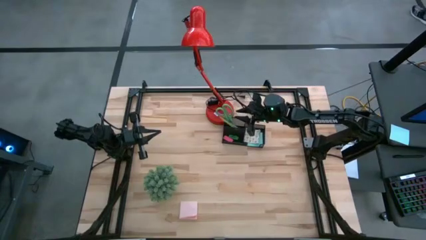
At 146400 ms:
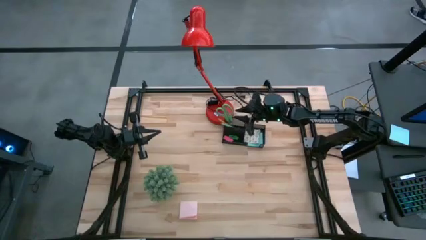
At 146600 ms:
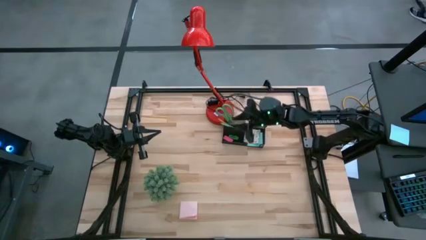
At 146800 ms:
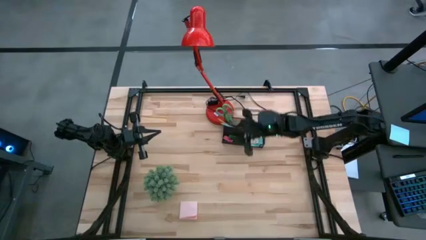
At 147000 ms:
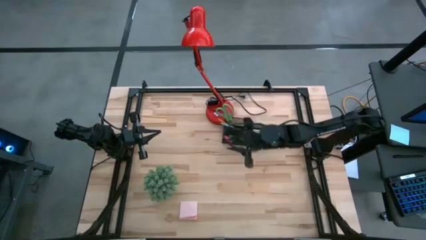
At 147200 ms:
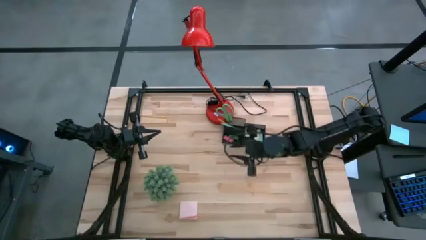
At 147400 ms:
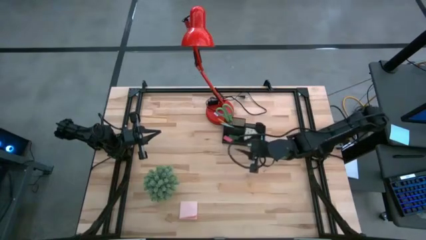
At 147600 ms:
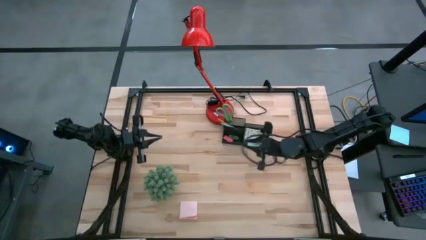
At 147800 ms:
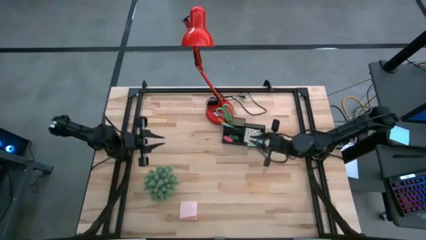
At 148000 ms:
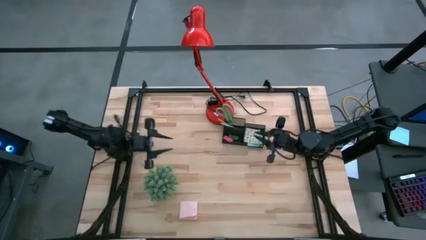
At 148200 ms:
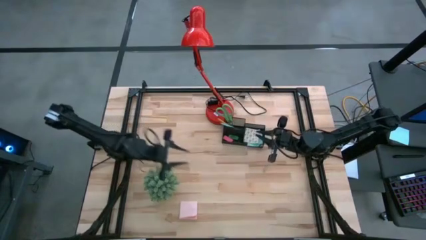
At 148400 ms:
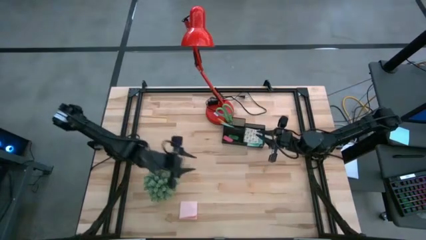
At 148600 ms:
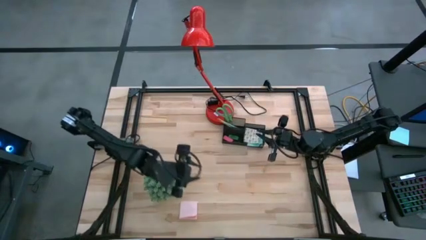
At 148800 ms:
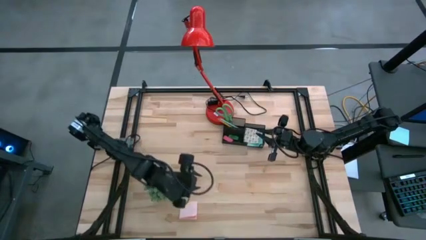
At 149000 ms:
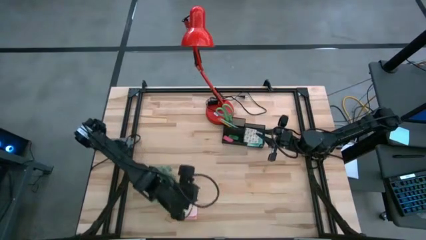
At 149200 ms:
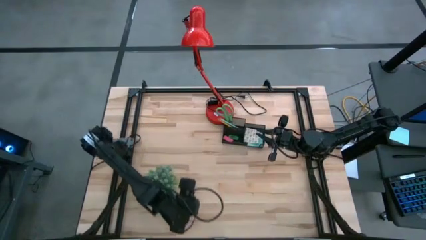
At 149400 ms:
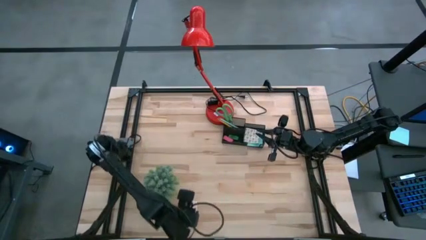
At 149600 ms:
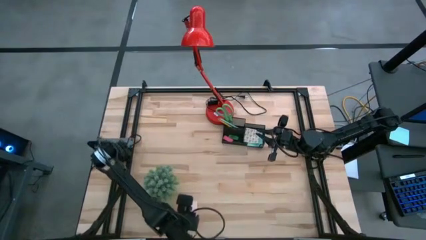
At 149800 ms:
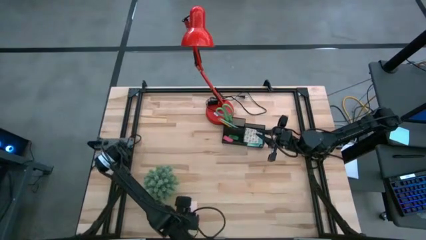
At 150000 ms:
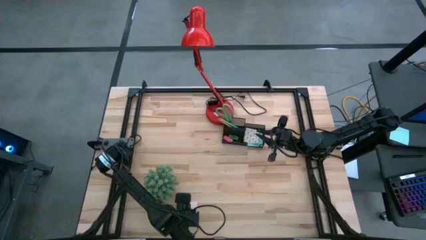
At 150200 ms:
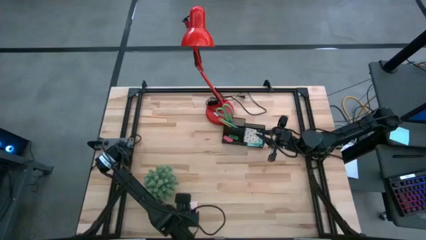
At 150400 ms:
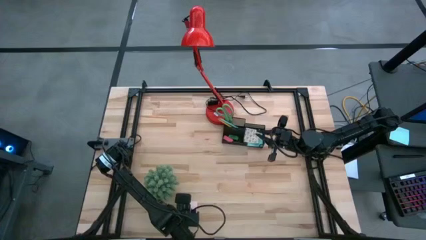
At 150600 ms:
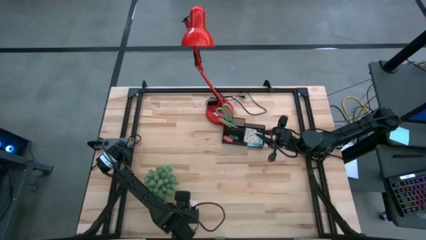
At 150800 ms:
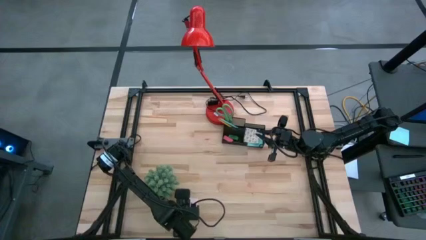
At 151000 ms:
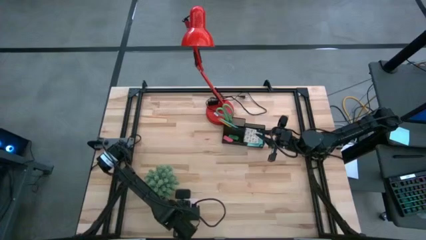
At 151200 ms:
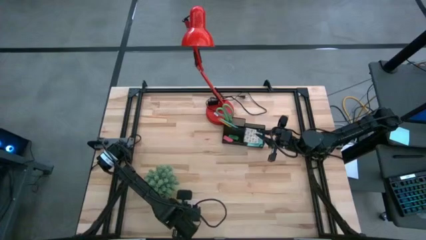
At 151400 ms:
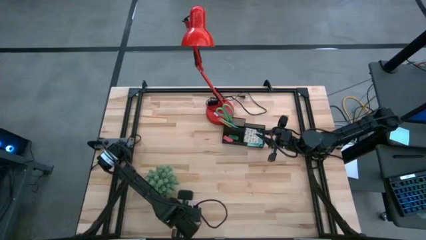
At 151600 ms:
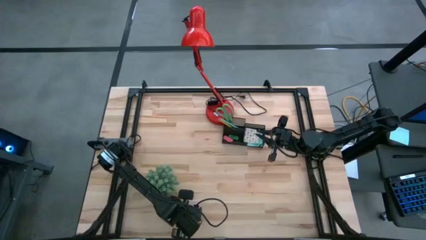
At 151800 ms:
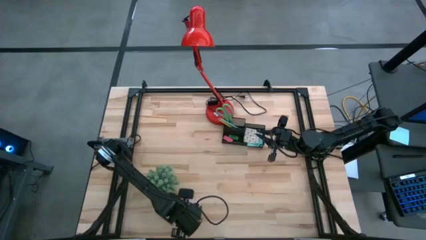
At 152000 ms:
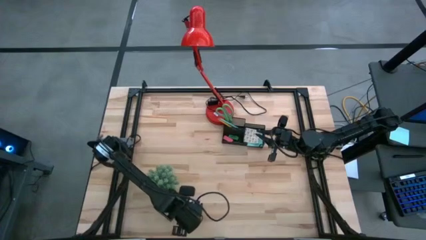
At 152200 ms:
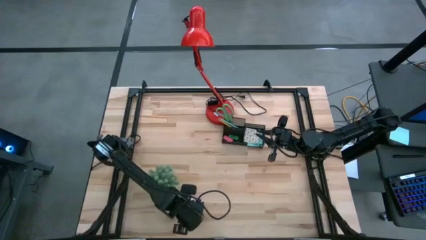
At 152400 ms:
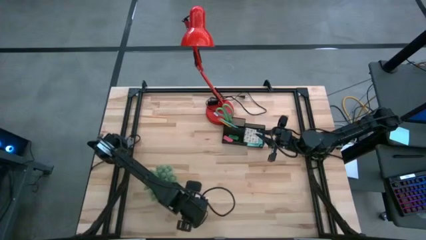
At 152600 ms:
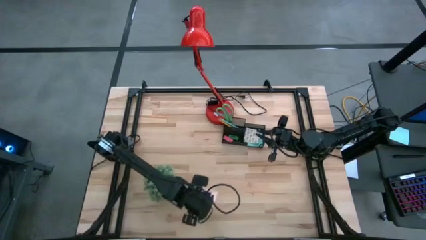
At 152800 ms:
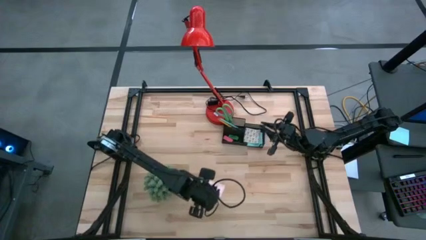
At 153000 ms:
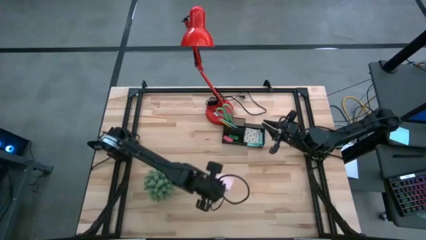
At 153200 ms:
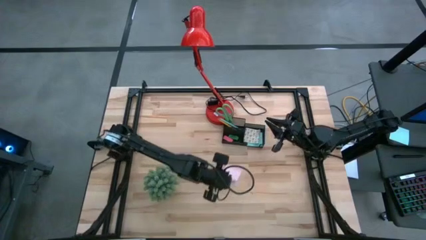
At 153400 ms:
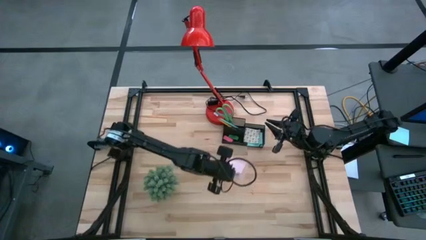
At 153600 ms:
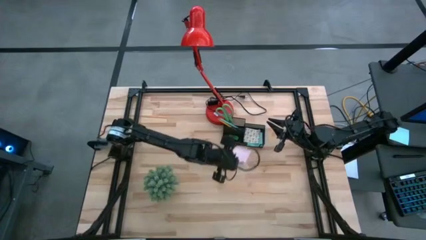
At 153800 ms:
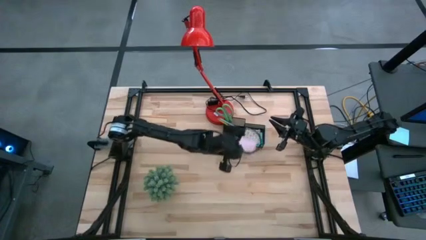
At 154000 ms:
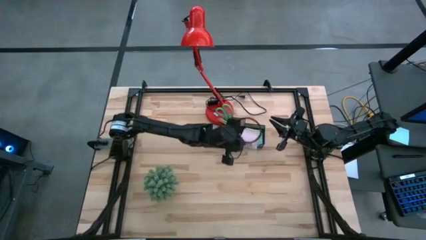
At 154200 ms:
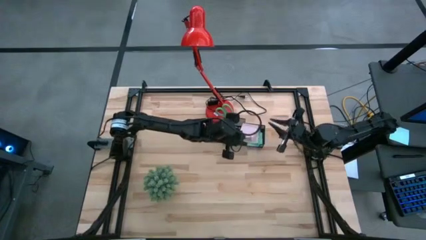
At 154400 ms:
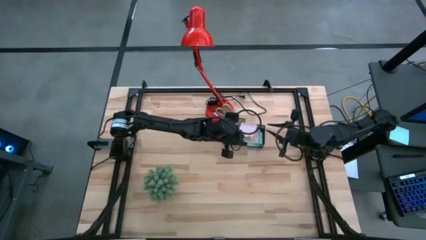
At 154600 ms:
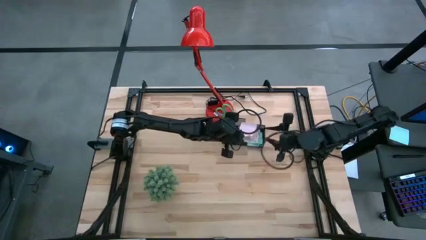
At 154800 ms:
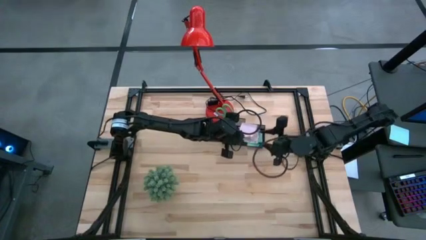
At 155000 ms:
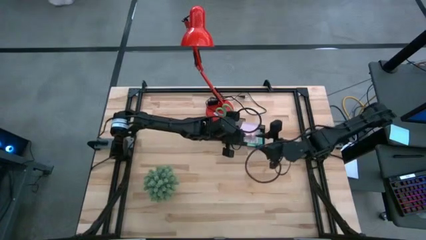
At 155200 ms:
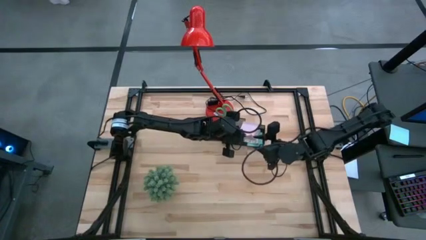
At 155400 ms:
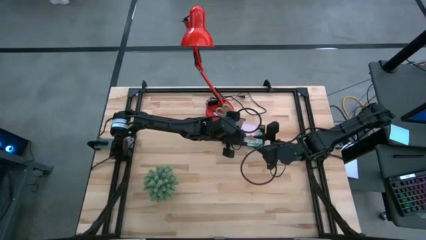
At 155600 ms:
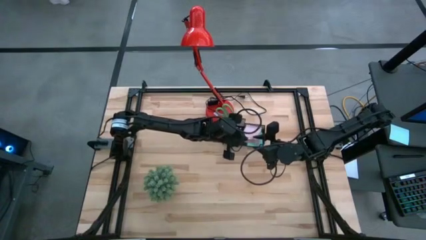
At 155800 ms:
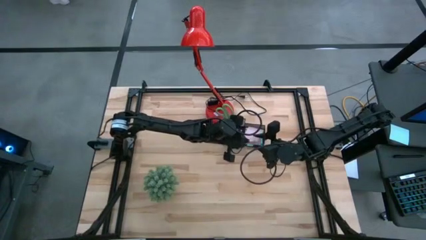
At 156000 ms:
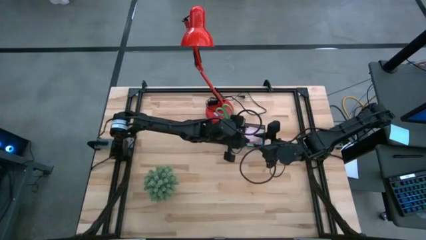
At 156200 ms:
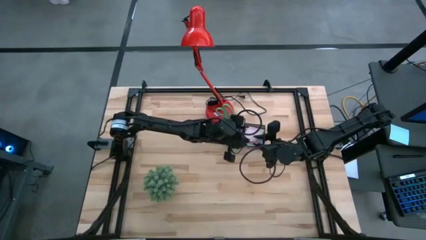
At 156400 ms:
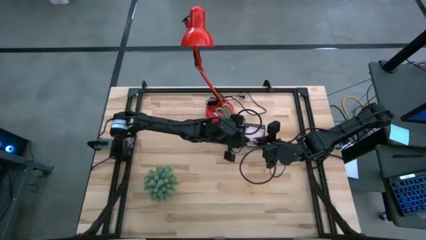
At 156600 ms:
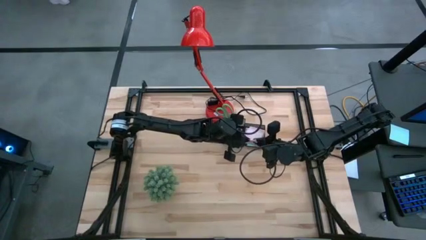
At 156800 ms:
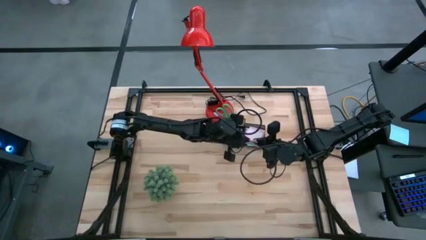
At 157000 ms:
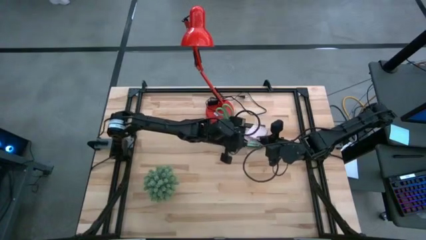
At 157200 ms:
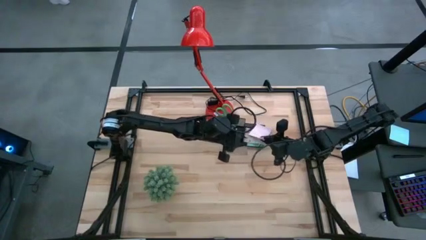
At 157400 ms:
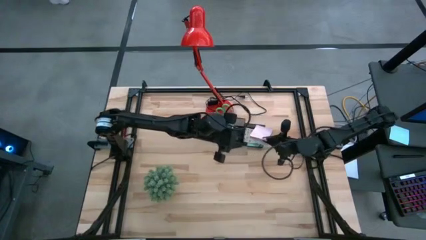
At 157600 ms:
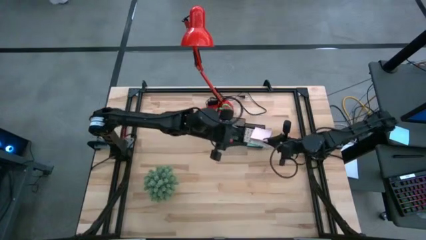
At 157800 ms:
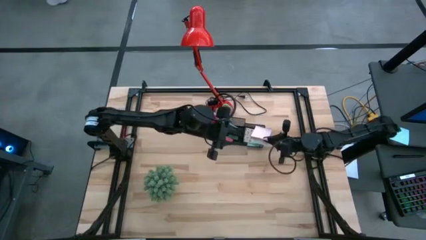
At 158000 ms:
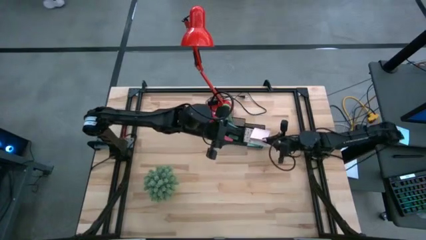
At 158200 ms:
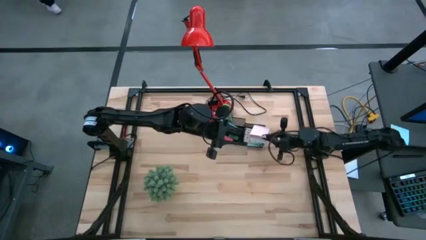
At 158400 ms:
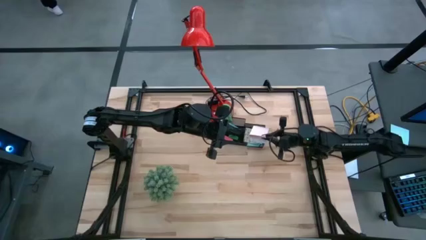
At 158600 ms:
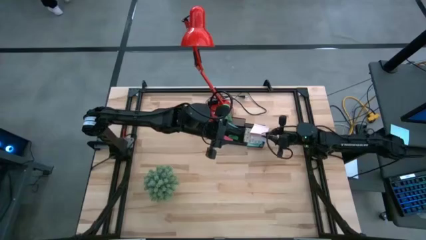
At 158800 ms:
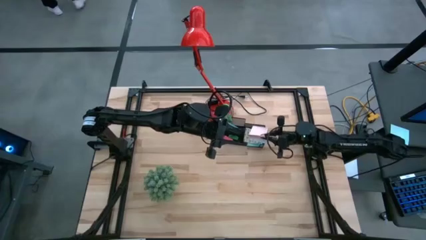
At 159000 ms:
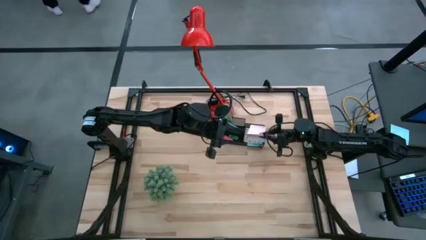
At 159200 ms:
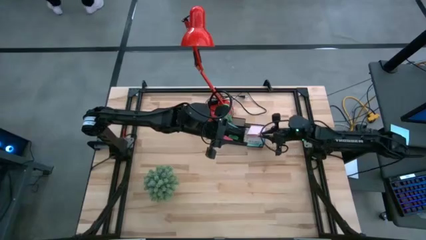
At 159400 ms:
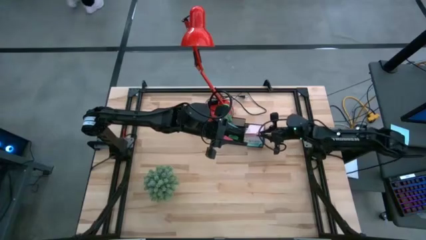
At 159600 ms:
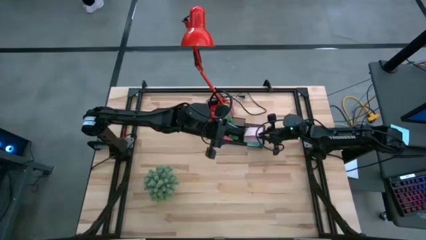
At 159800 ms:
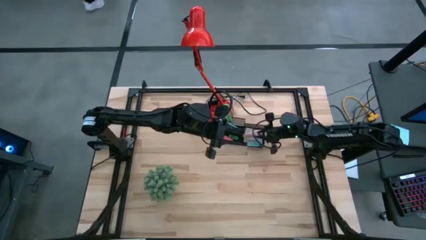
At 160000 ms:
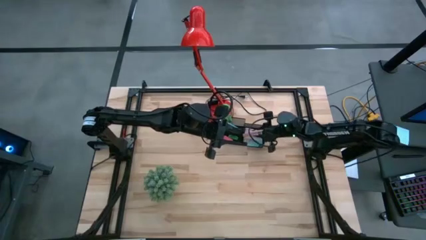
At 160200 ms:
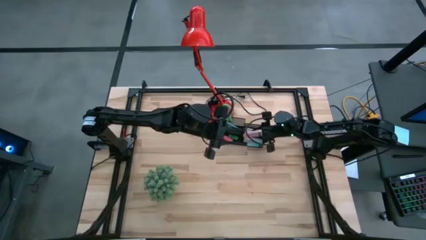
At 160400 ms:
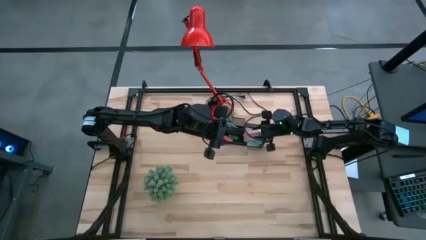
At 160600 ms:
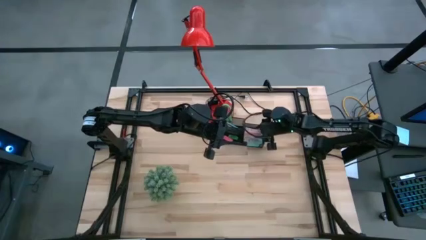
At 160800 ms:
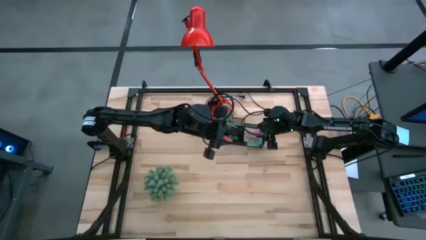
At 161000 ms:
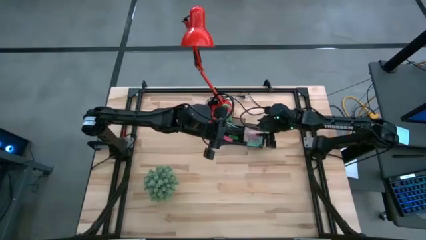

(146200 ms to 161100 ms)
Task: Pick and place office supplies into organizer
Put the pink sticky note into the front left compartment of the desk organizer
